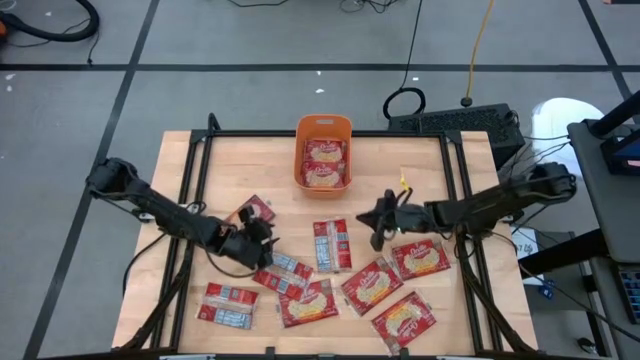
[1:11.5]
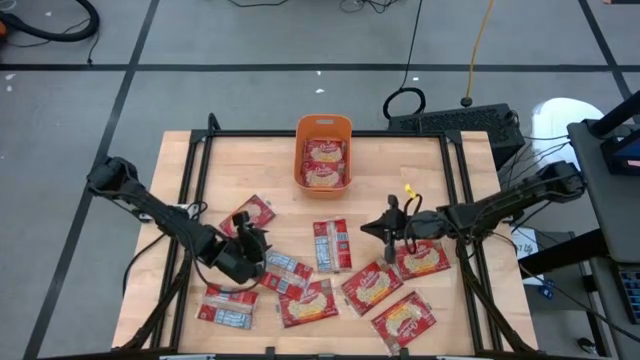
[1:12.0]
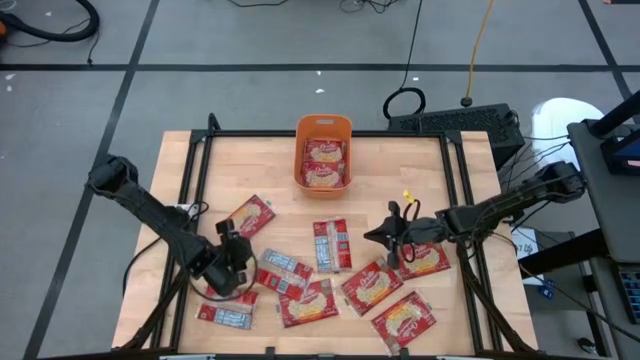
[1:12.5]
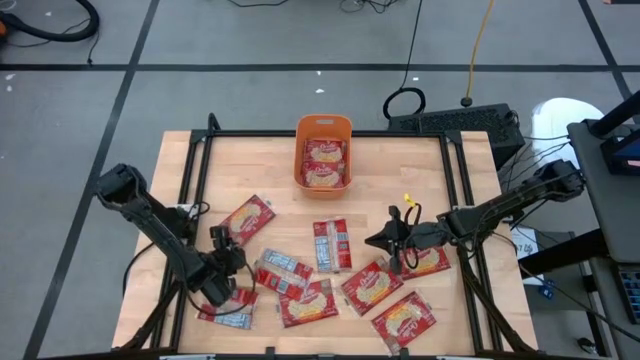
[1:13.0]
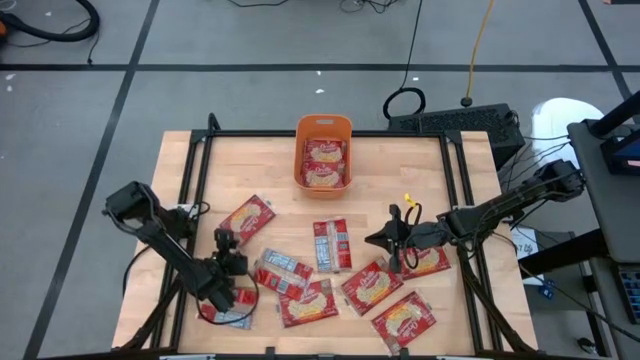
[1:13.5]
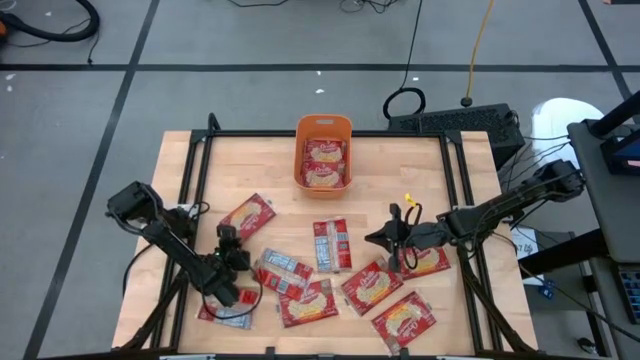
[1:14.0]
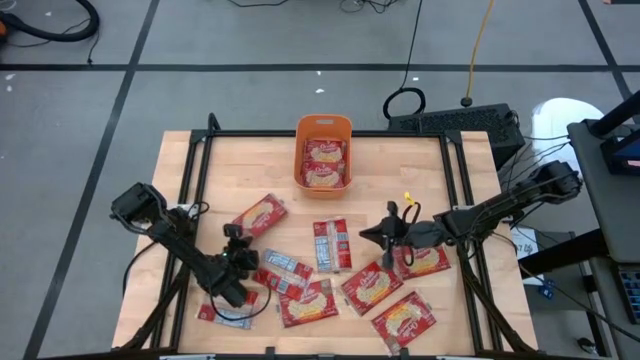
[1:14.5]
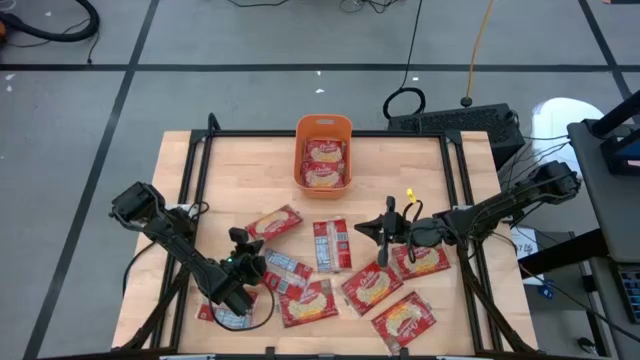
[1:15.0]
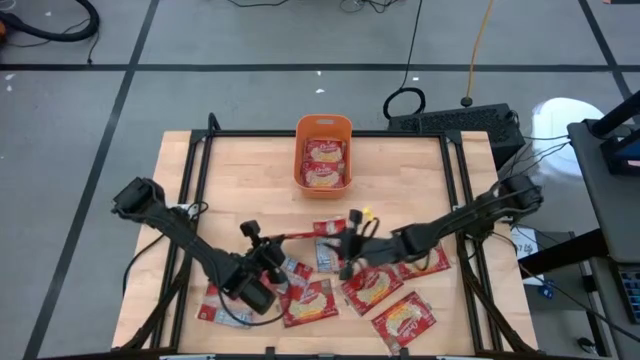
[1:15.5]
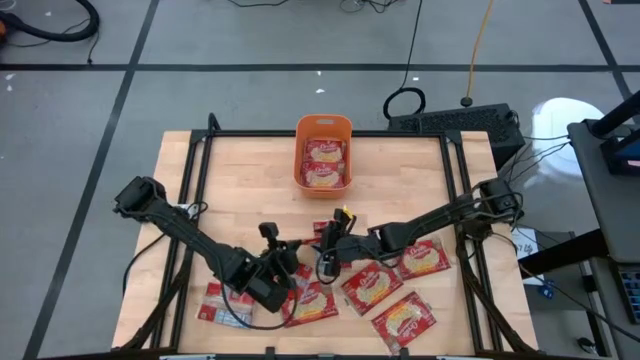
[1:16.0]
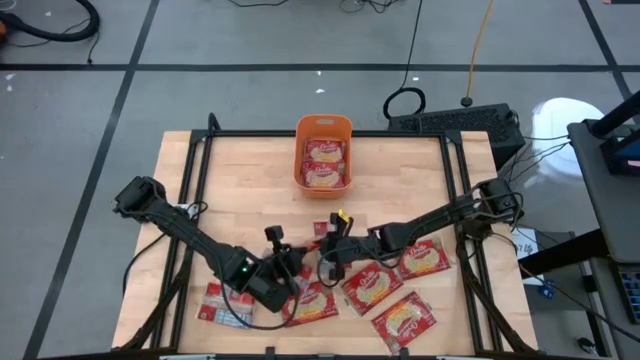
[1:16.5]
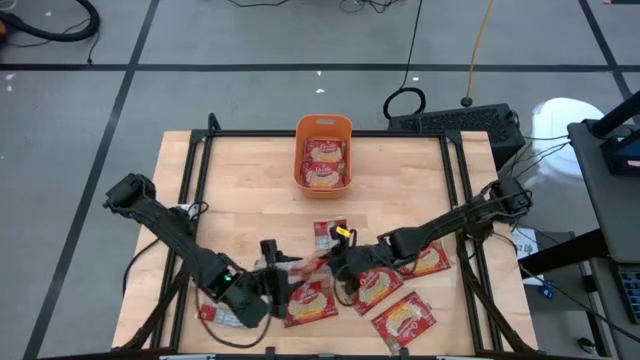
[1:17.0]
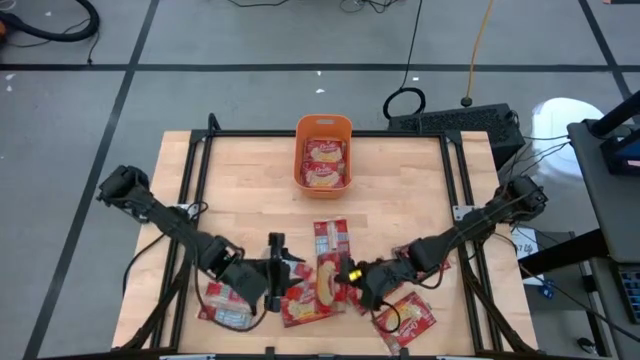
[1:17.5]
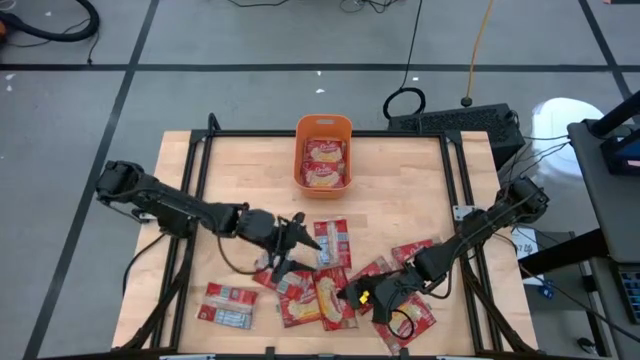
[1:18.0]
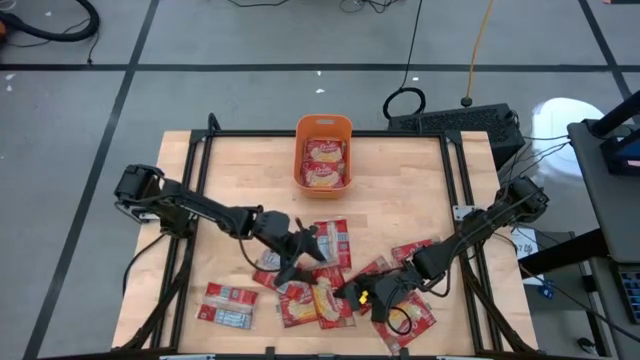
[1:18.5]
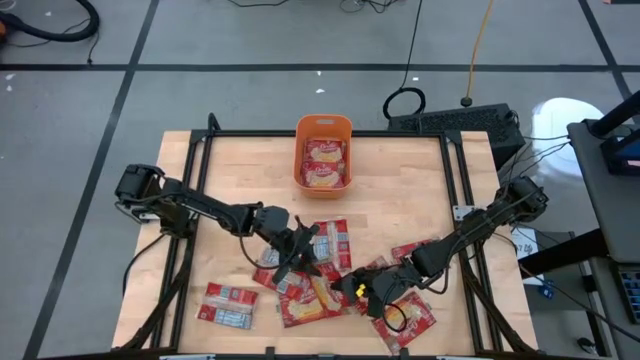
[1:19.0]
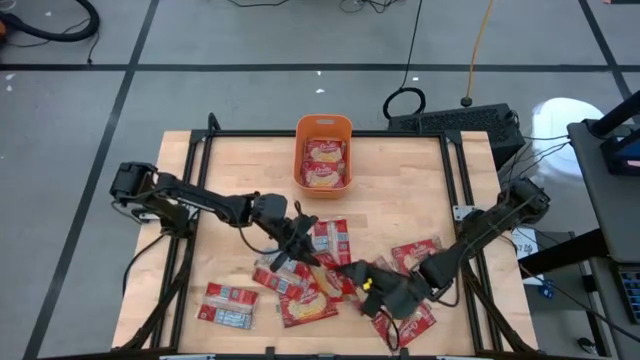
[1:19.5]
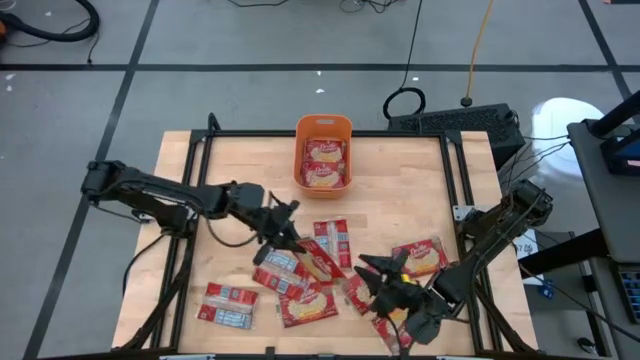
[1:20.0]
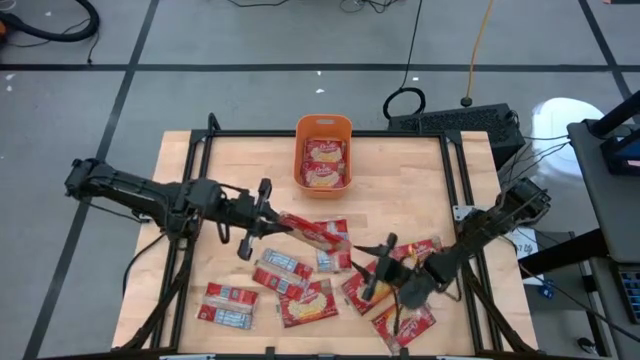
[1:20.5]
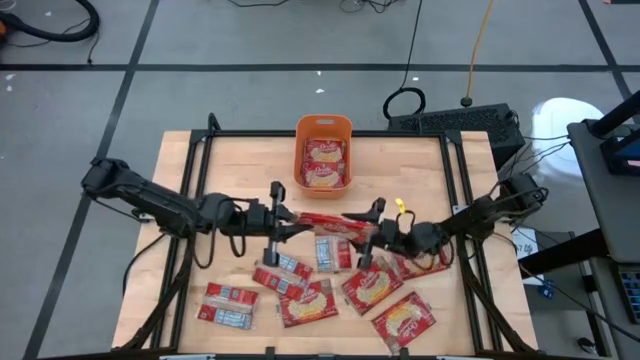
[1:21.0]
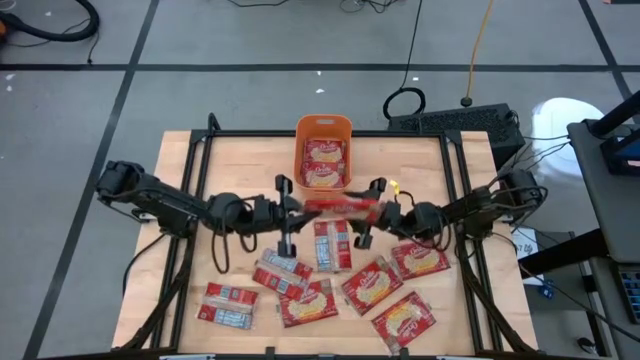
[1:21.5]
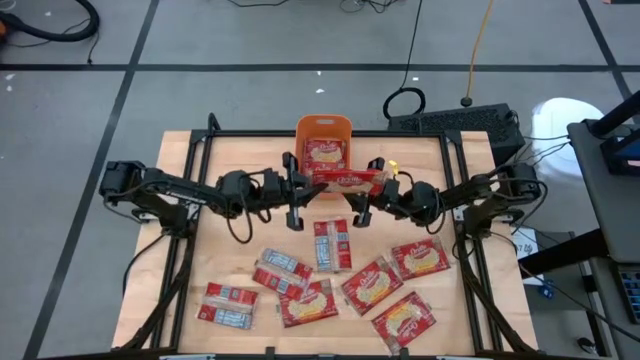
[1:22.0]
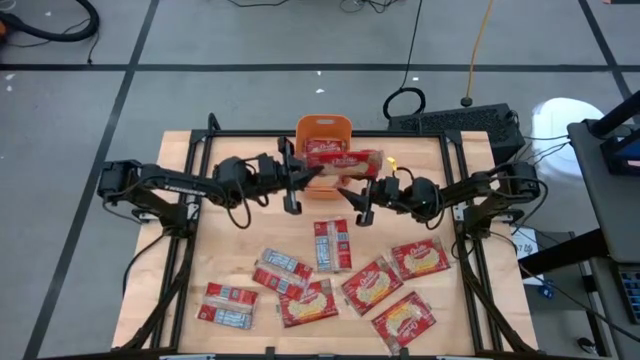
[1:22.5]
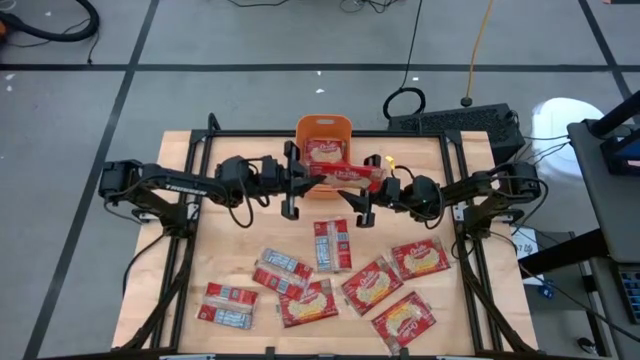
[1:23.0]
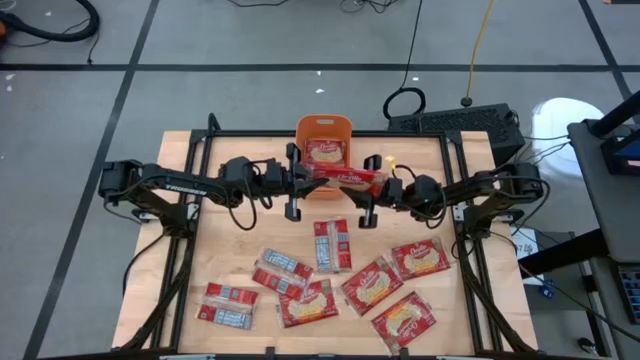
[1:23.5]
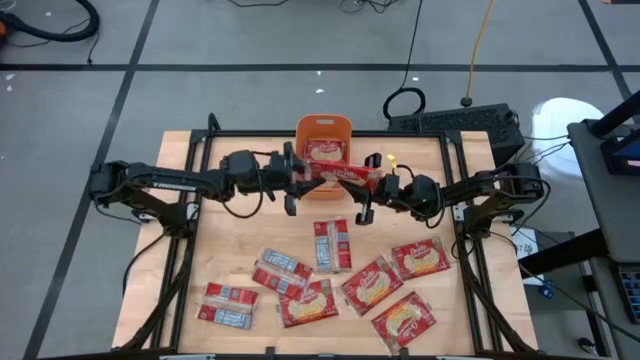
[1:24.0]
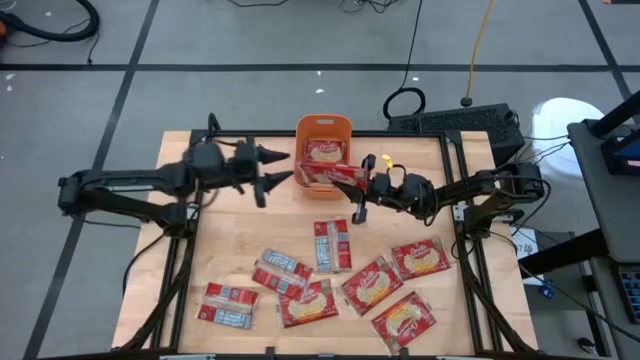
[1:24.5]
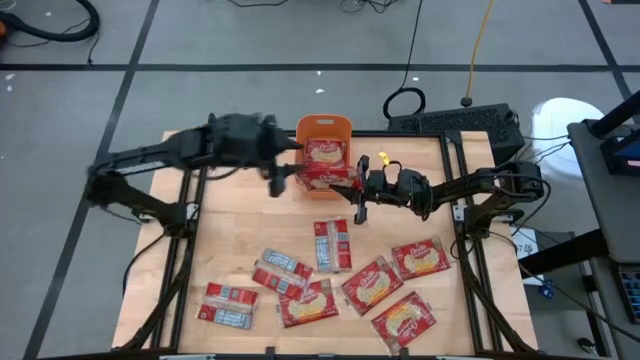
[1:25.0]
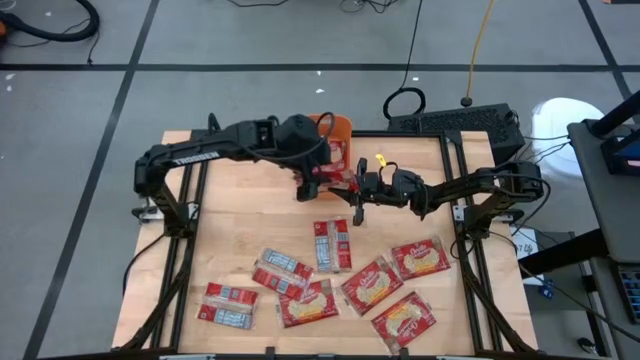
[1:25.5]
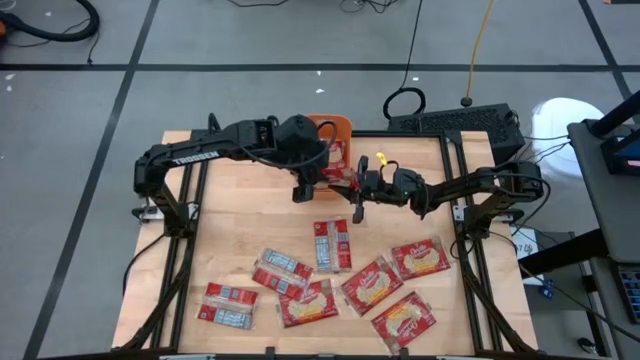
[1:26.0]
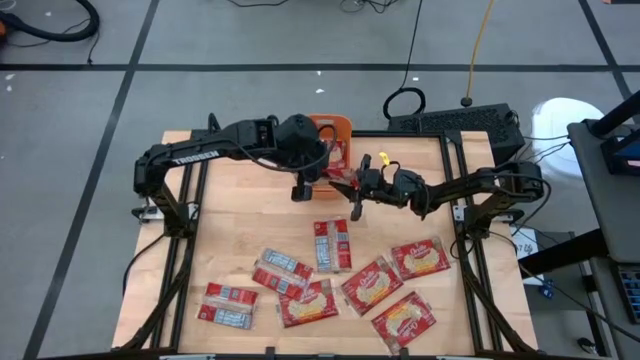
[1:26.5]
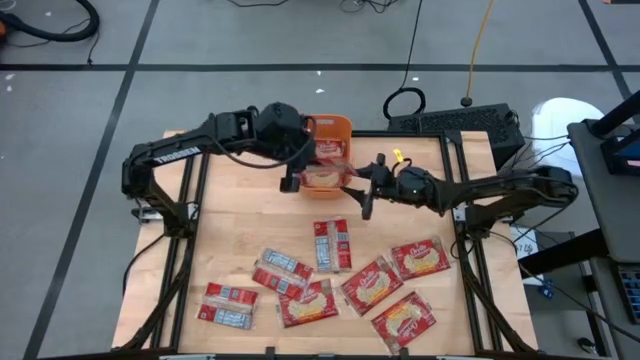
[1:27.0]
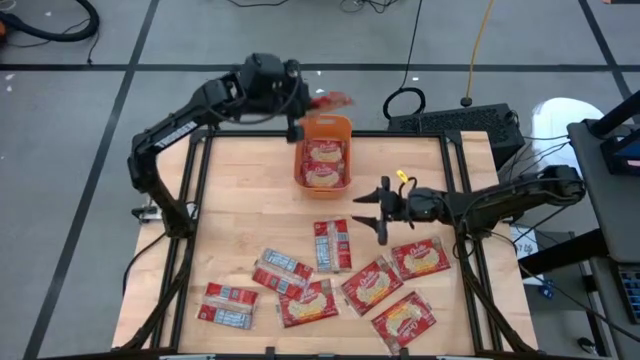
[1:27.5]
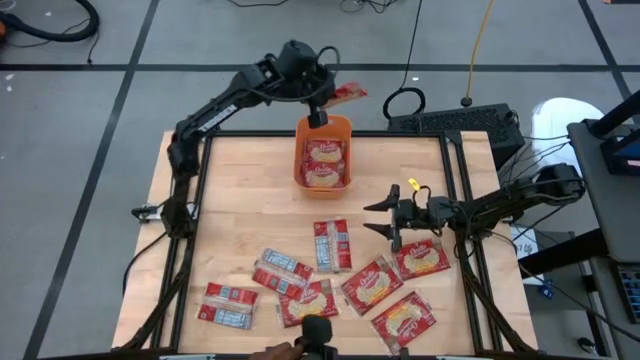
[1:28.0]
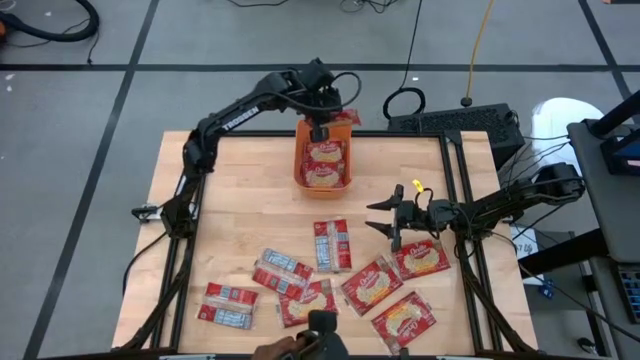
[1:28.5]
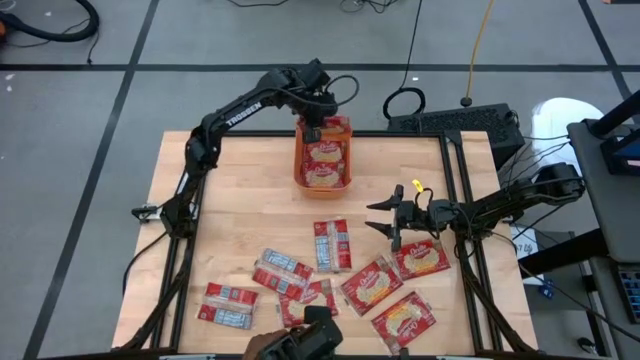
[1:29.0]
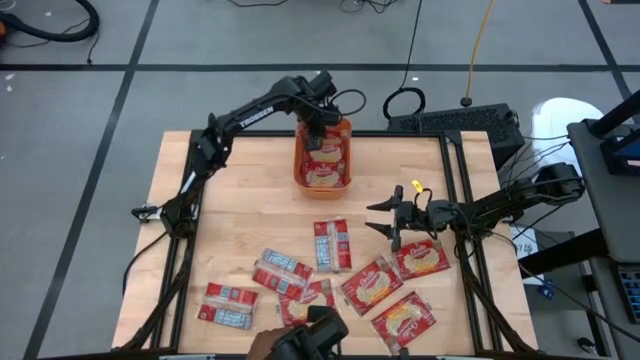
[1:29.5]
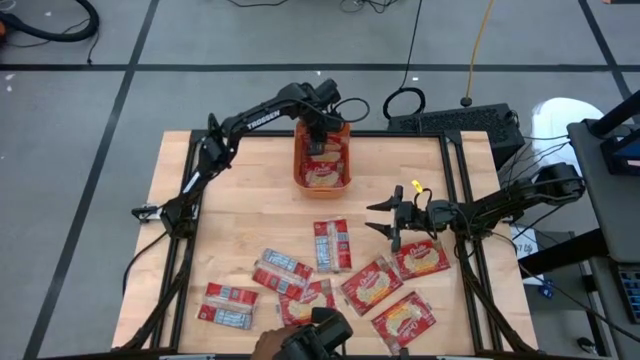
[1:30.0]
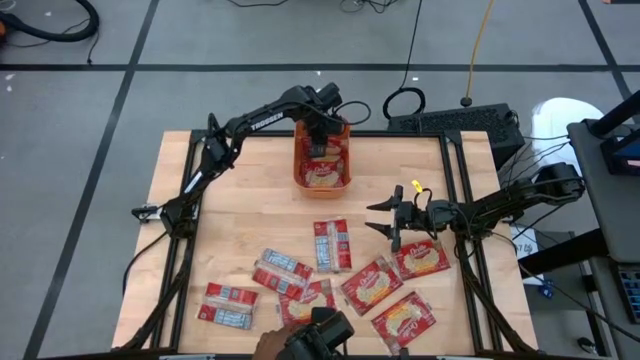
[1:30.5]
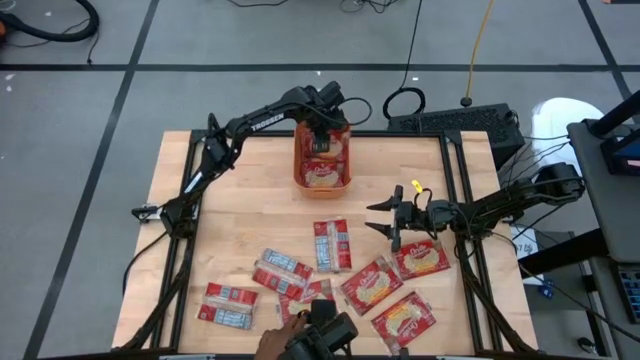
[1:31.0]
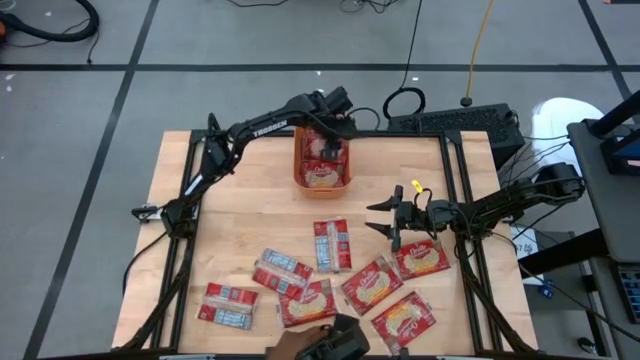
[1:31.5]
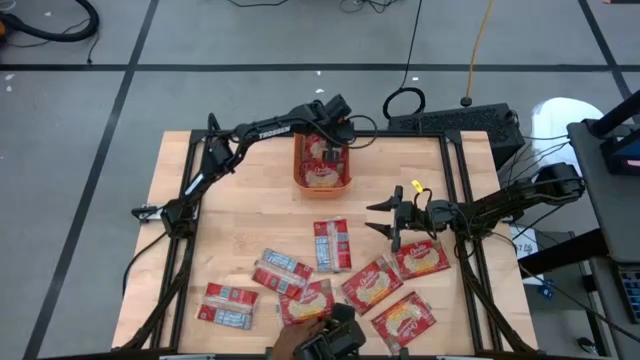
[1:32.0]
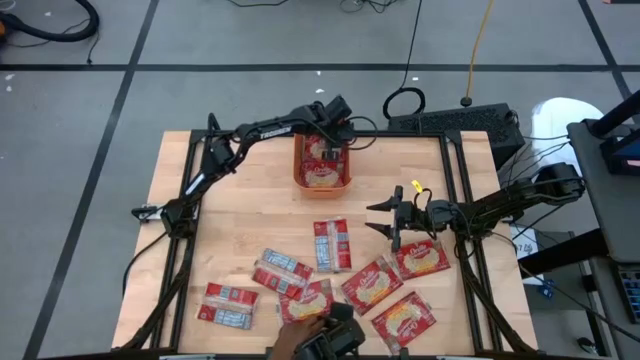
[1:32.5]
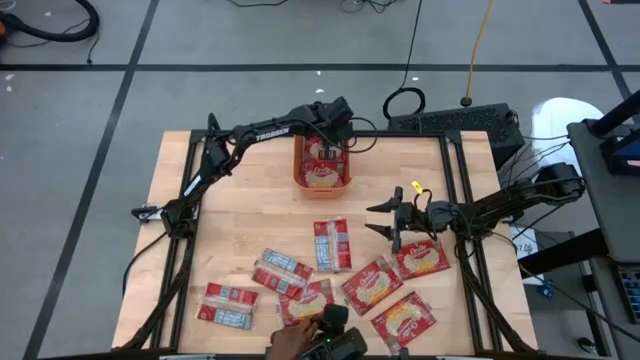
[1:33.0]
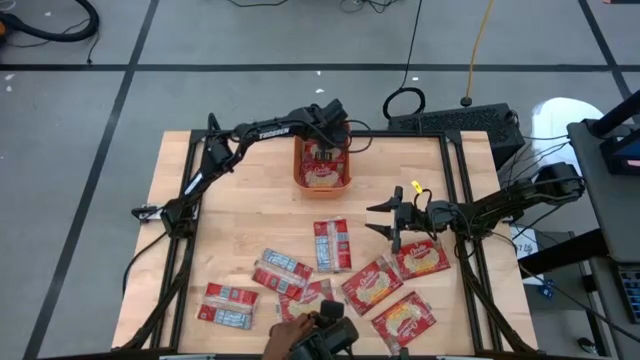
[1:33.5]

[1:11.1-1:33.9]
Task: Sort popcorn bags into baskets
Put the red popcorn bag into the orange bin
